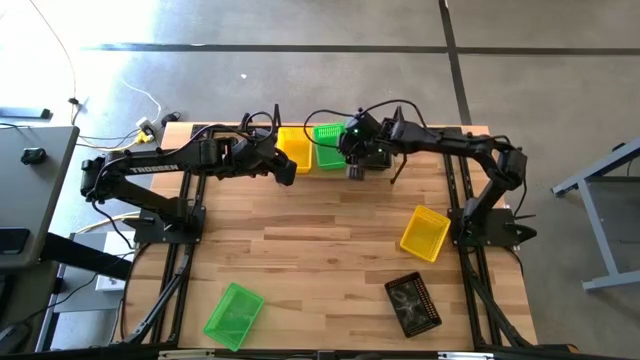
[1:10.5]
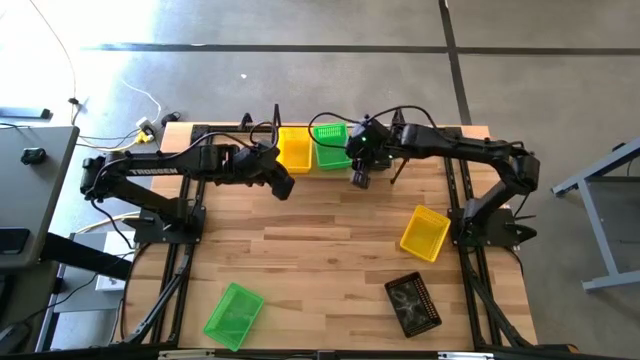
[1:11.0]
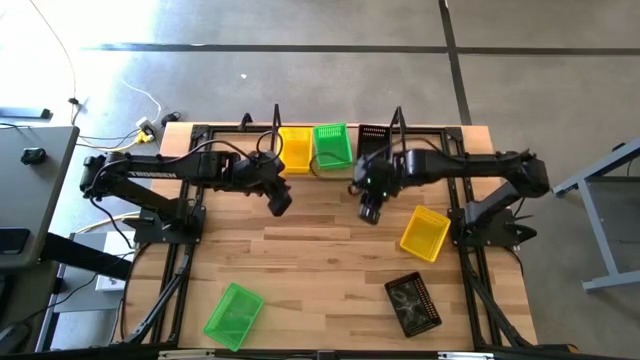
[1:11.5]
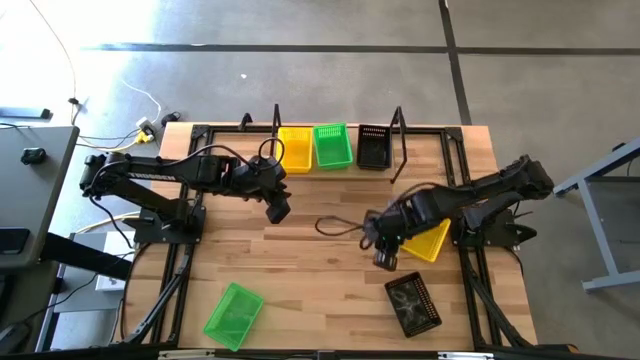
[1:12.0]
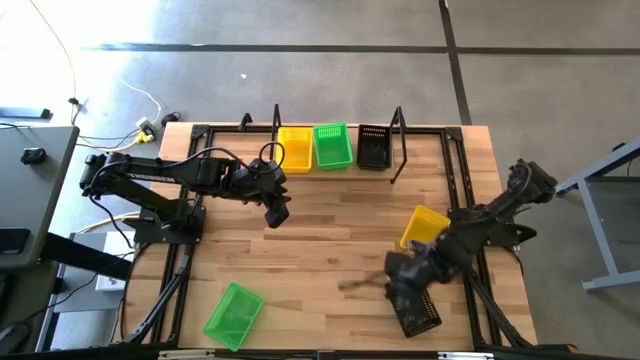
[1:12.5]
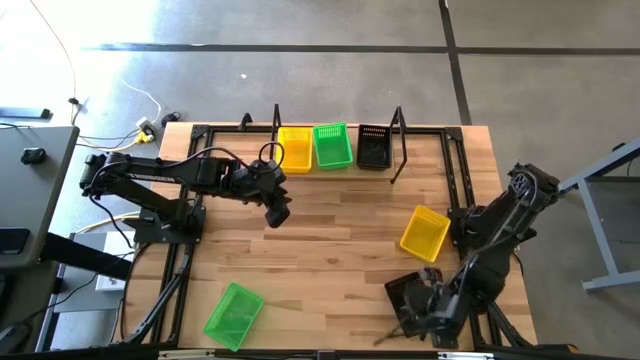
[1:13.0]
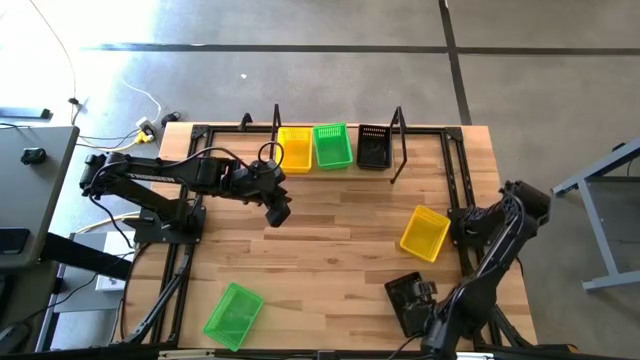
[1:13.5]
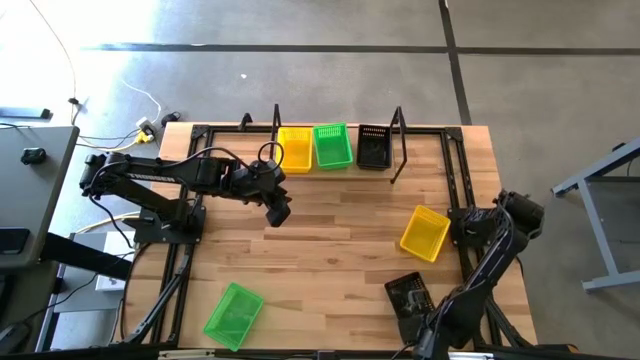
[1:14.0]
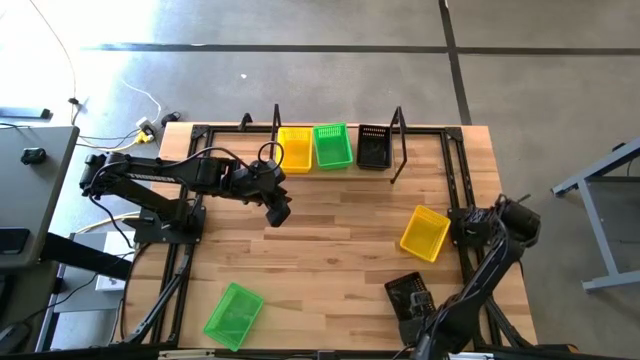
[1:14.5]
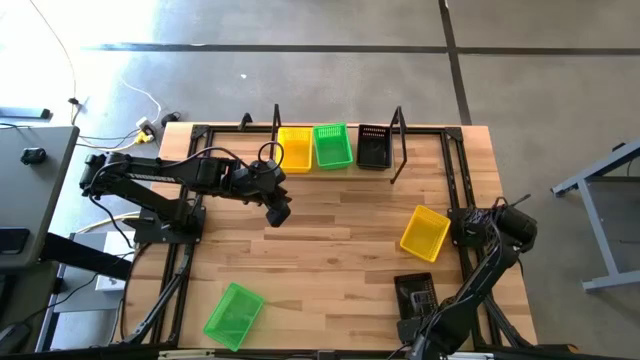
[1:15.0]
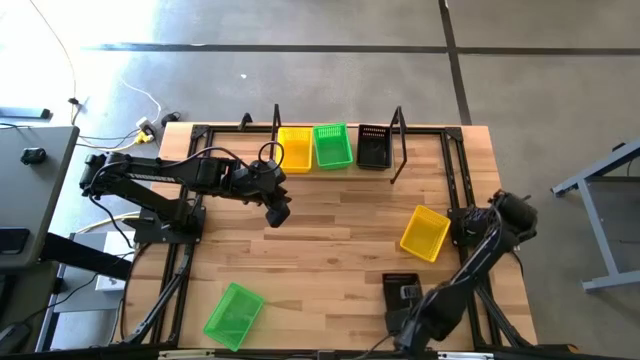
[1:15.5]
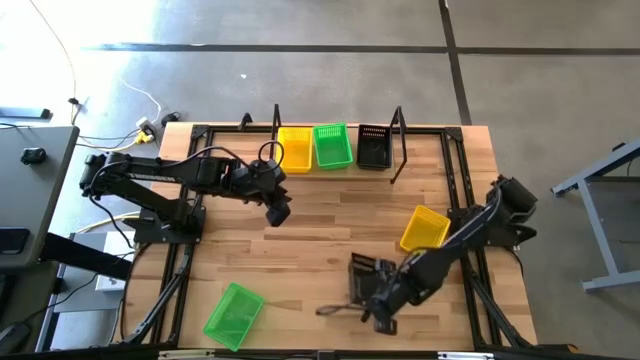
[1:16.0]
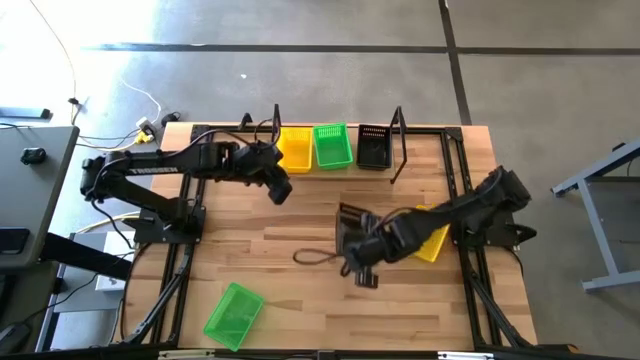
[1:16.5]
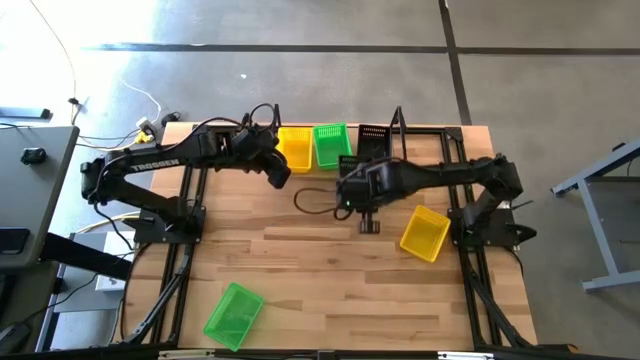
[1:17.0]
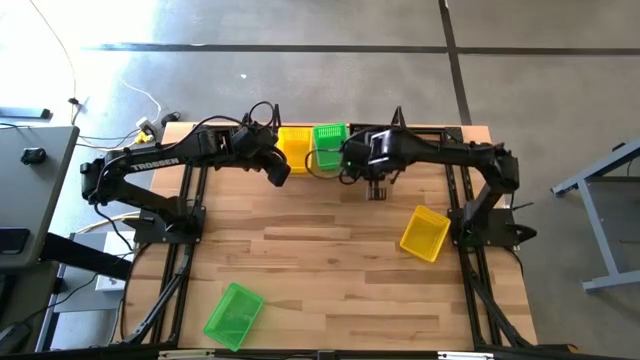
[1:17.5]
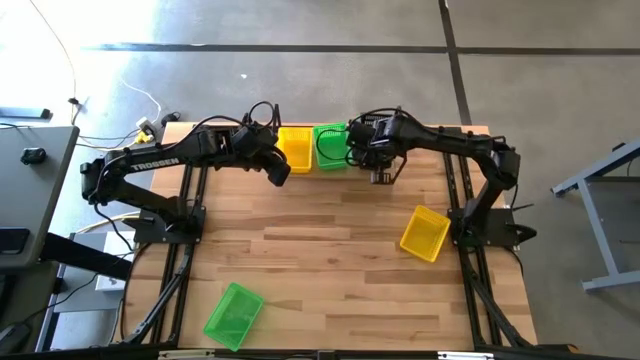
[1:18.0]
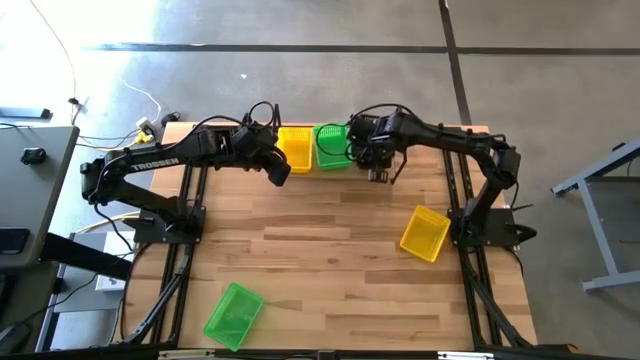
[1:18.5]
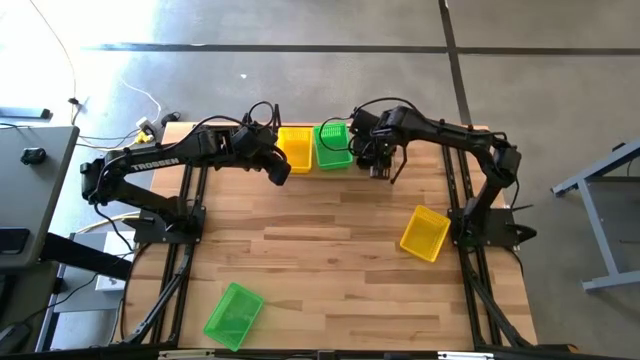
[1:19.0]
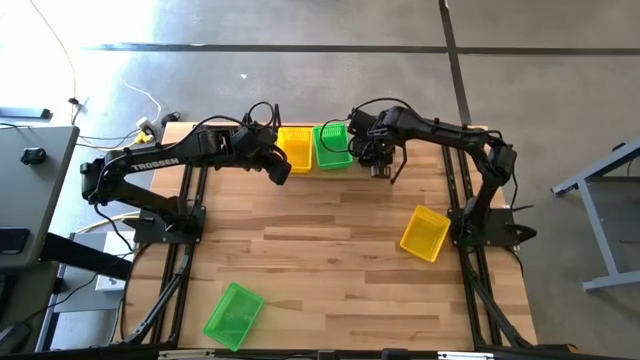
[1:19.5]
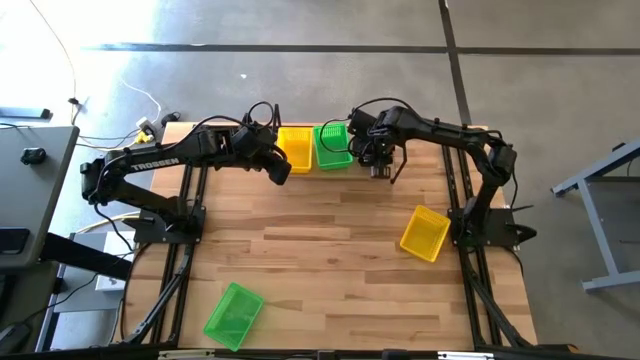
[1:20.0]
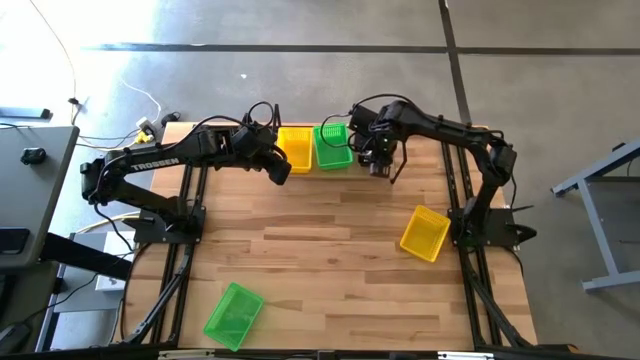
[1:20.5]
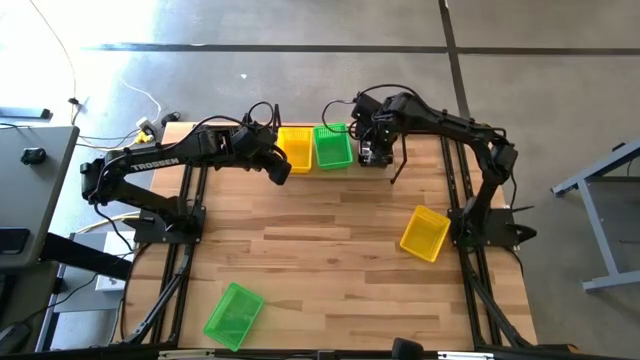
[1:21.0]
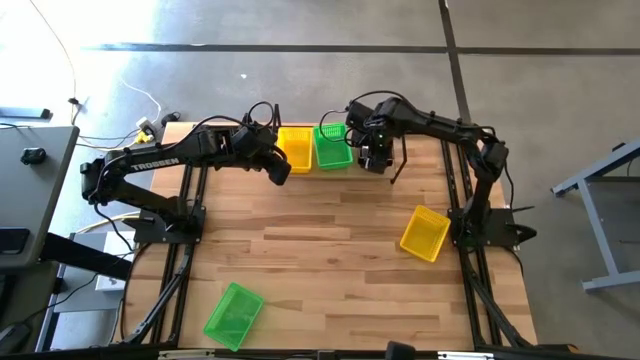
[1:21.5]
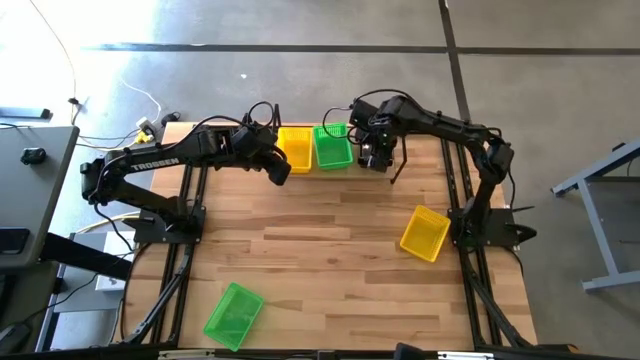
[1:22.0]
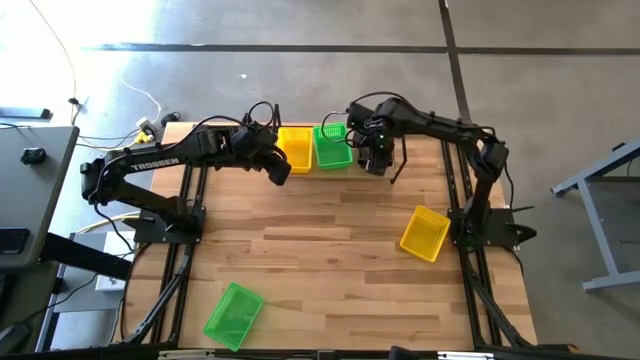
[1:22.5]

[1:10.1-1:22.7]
Task: Stack baskets on shelf by color
Stack the black bin on the other stacked black bin on the shelf

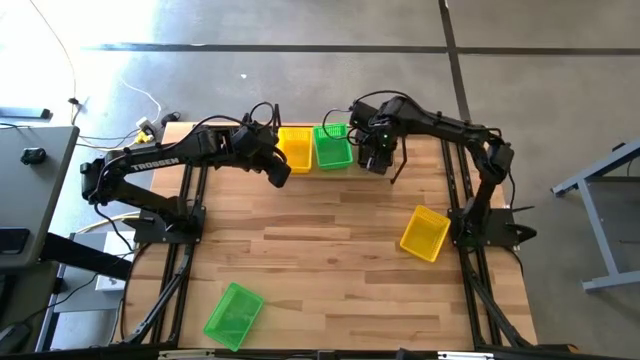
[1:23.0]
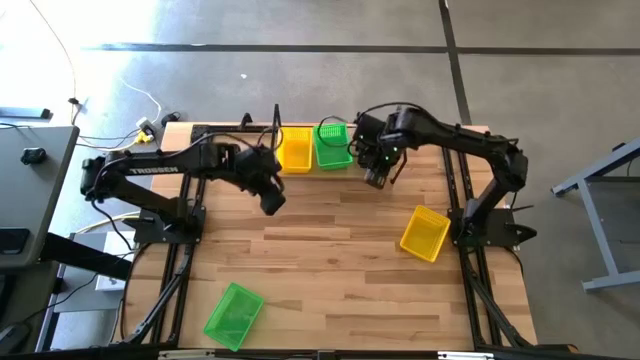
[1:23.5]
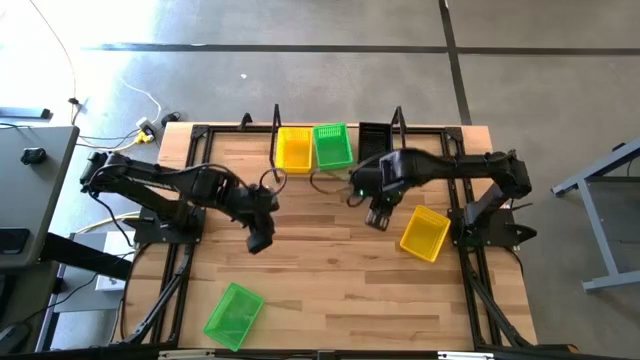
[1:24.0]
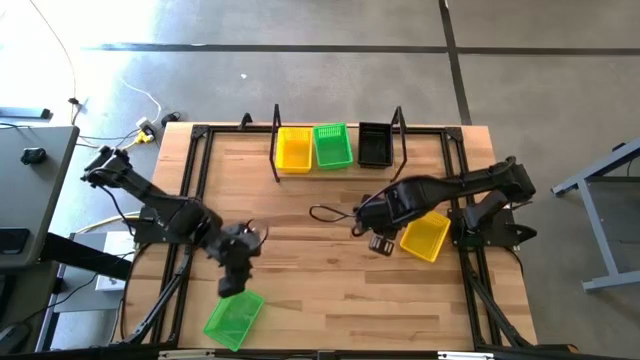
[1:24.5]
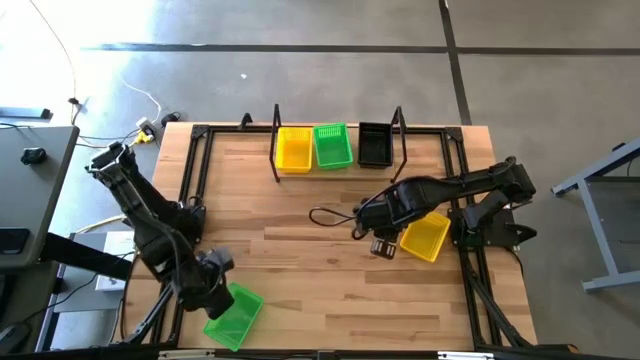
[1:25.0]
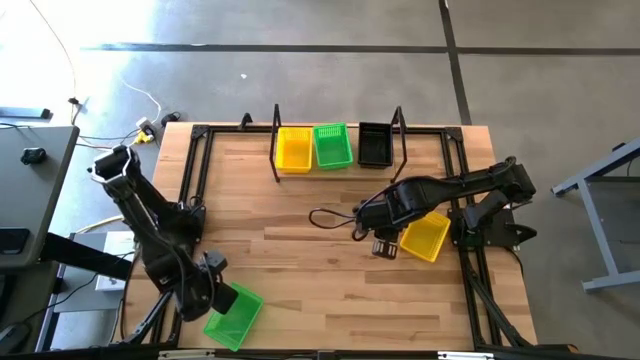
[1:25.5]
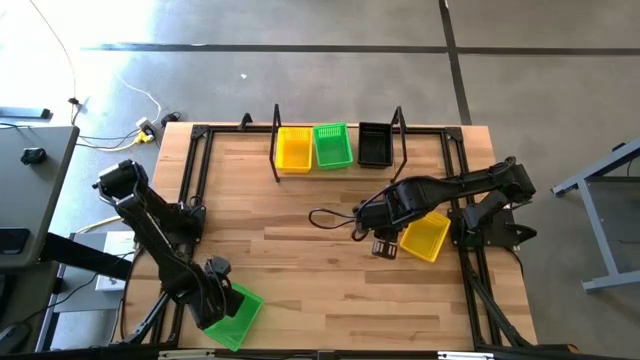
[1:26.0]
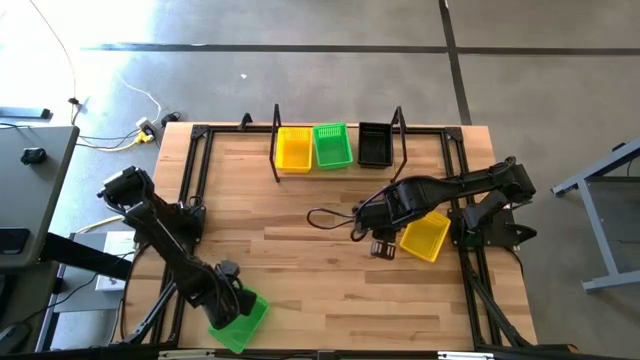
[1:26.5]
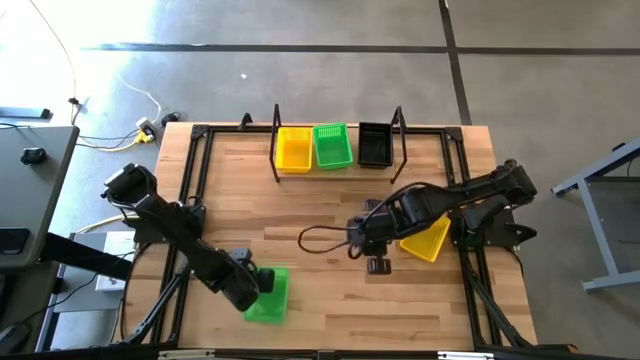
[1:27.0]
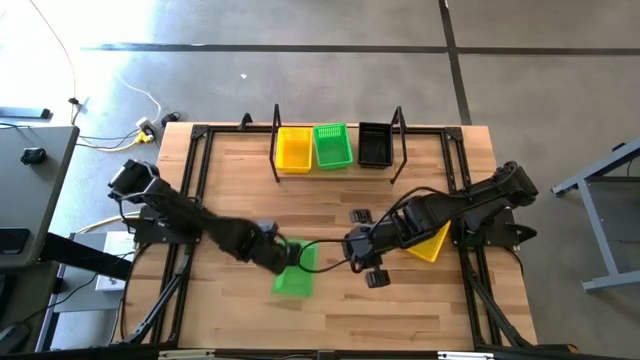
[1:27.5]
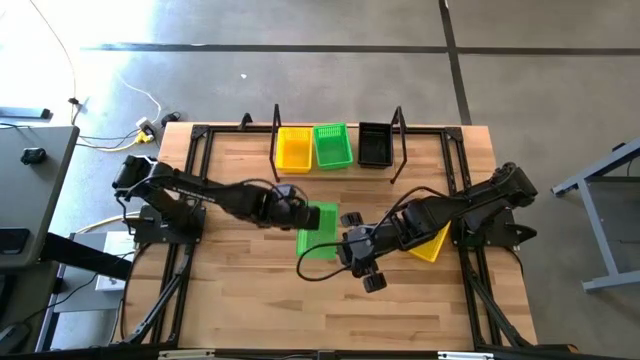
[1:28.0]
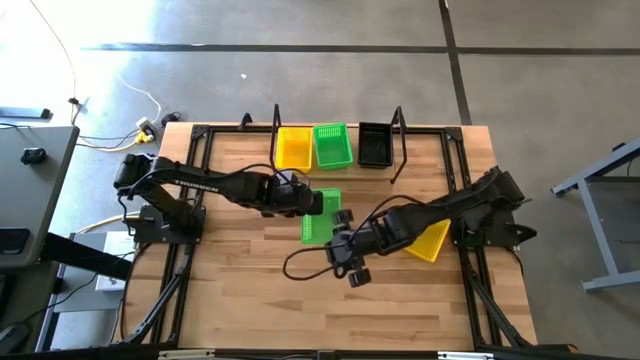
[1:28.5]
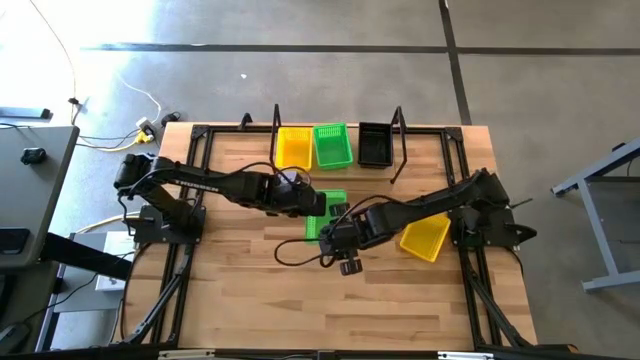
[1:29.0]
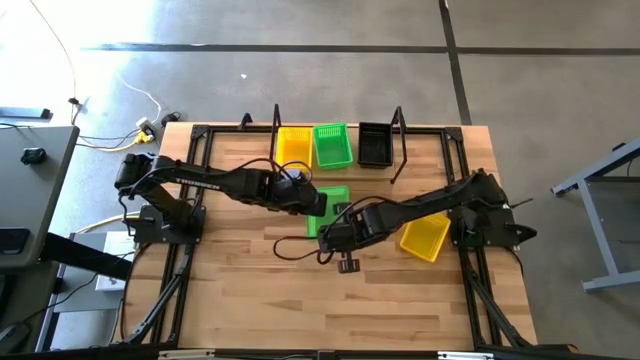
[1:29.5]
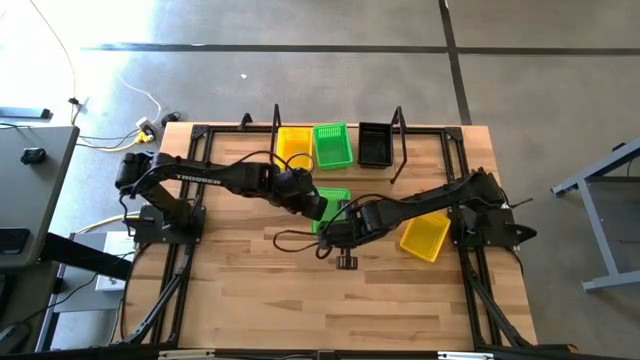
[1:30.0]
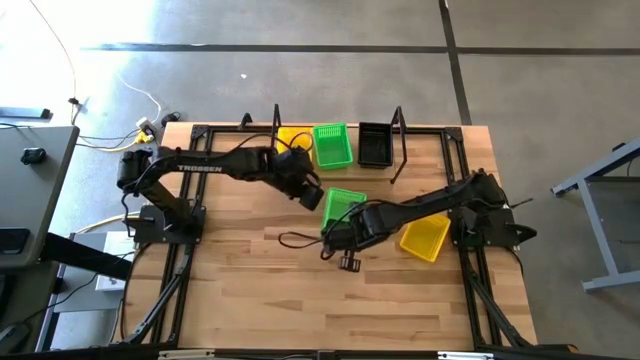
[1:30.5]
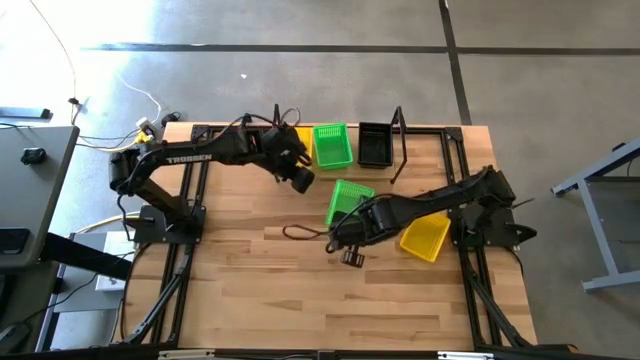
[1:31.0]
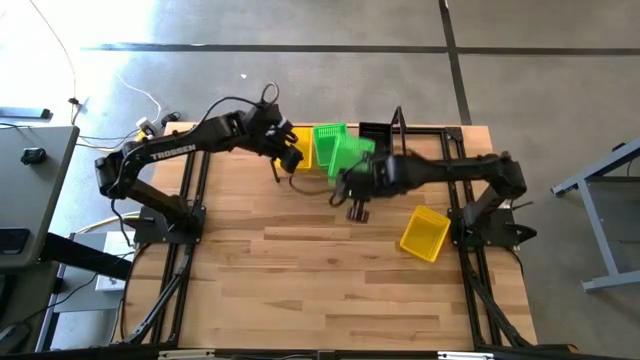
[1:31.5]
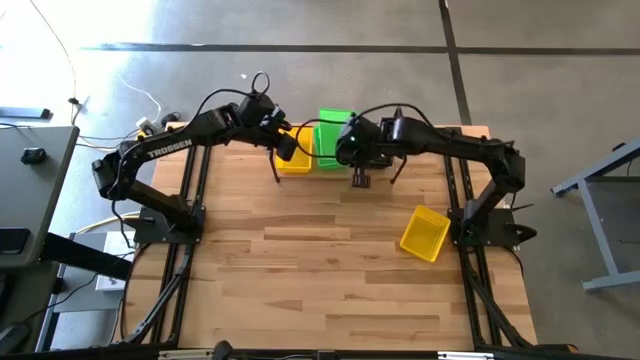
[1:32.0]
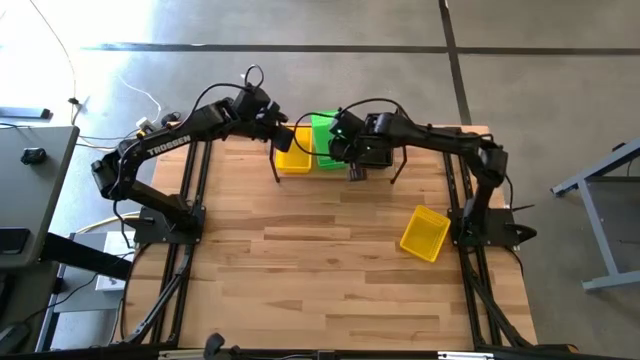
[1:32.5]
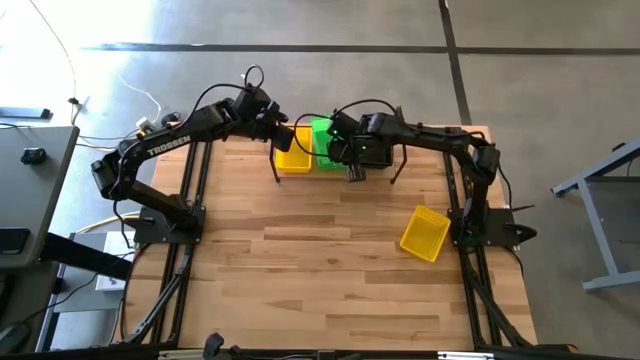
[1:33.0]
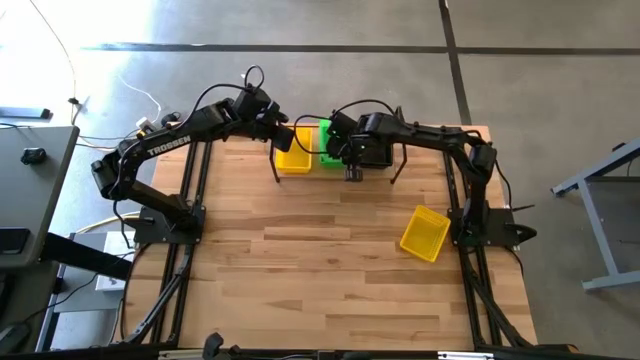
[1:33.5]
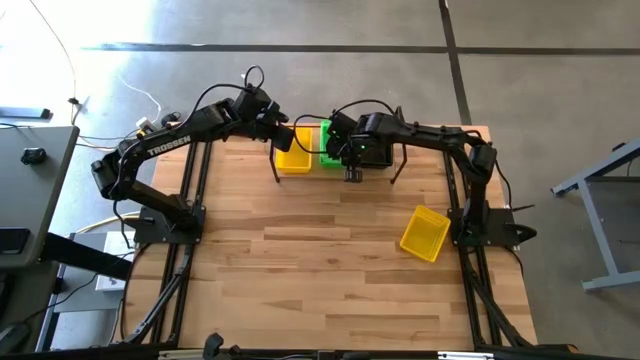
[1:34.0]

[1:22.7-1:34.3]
Stack the green bin on the other stacked green bin on the shelf
